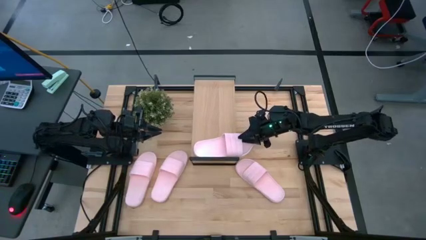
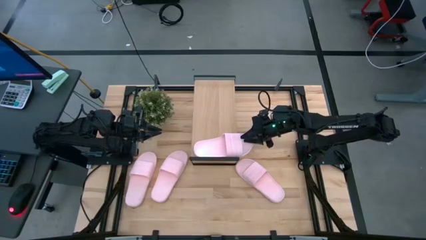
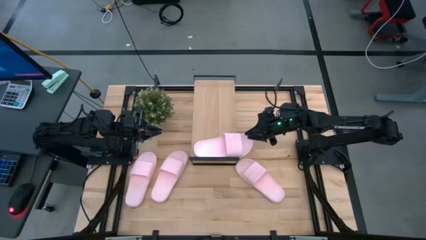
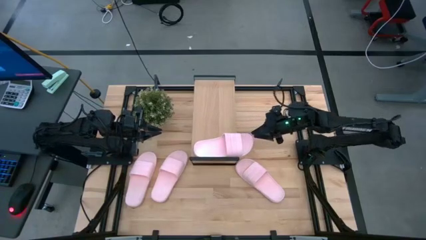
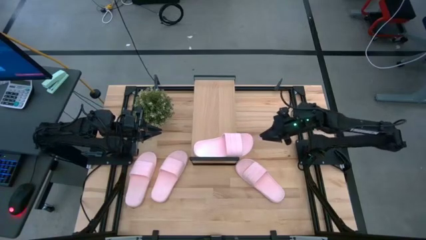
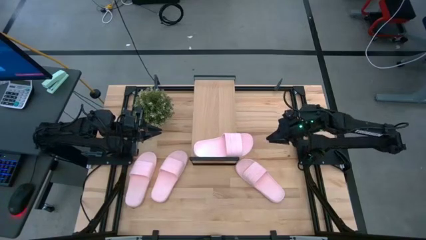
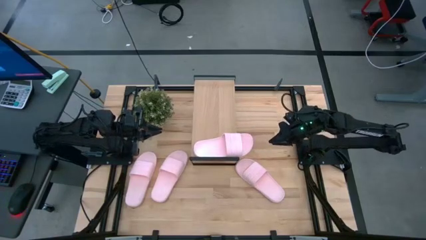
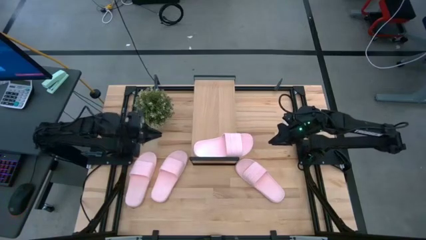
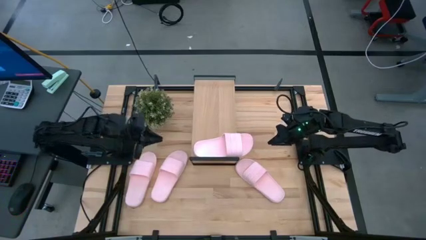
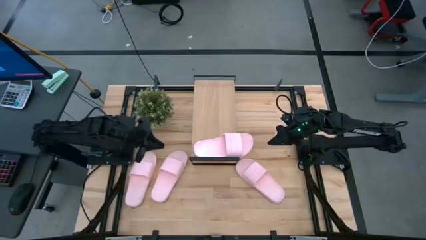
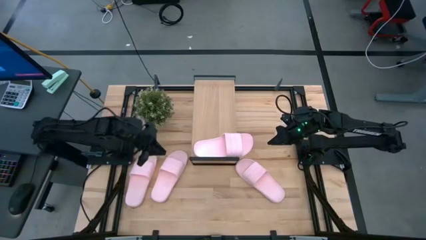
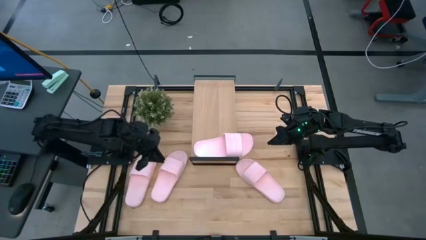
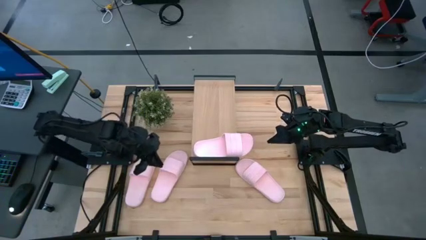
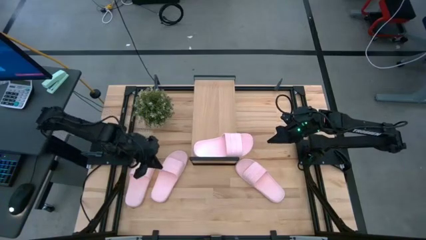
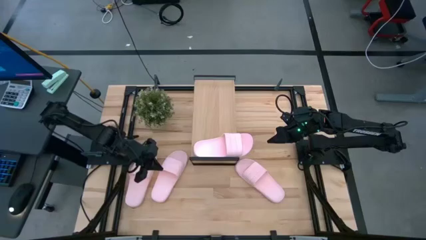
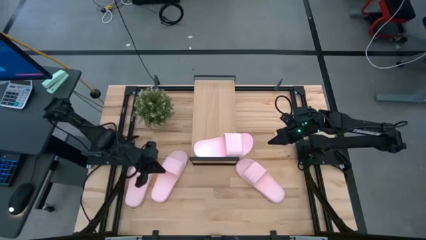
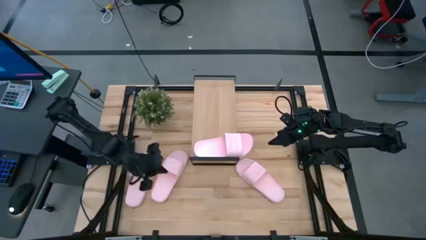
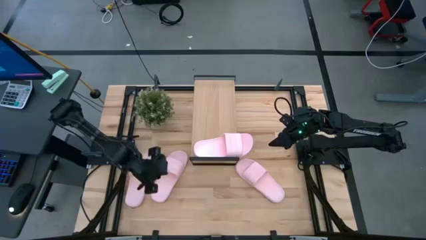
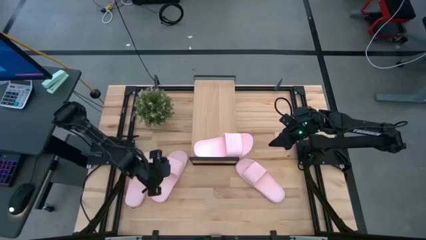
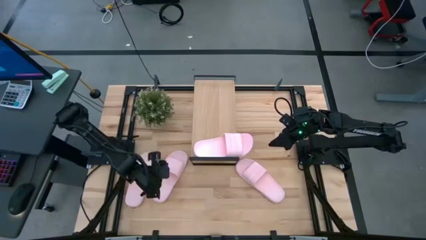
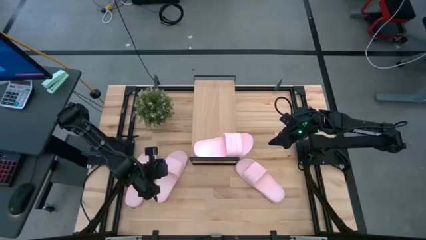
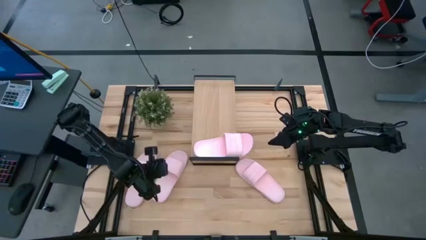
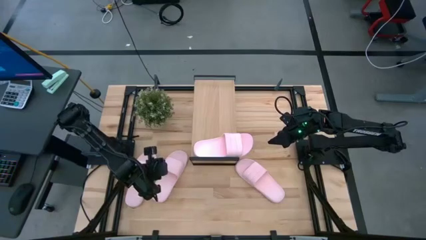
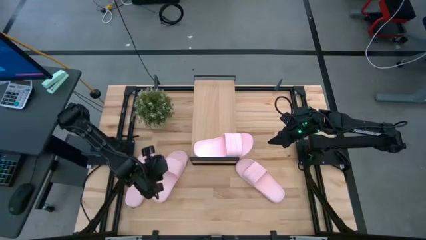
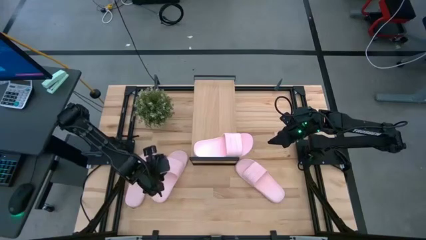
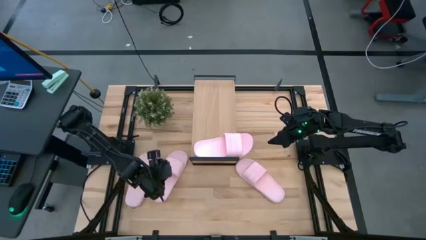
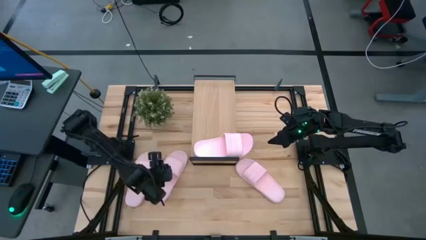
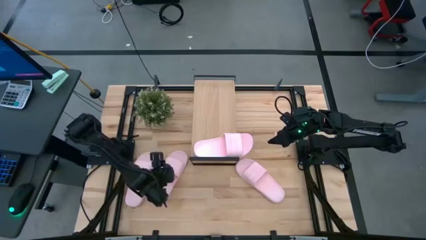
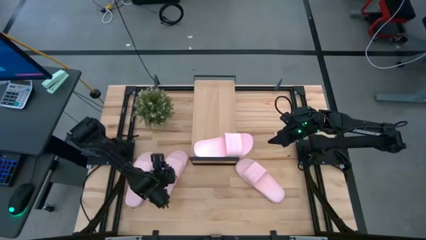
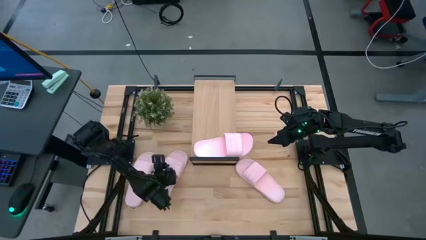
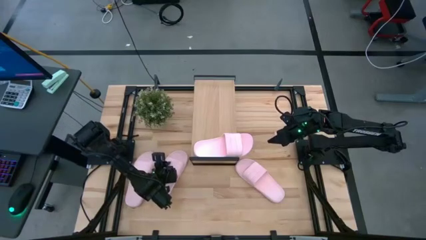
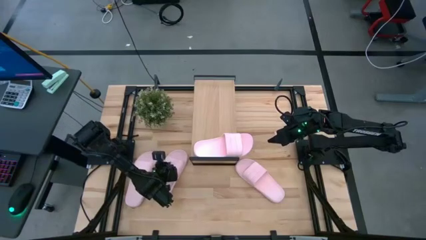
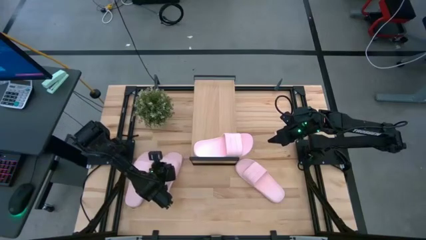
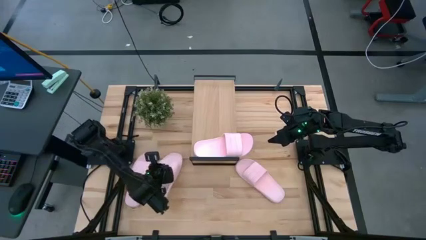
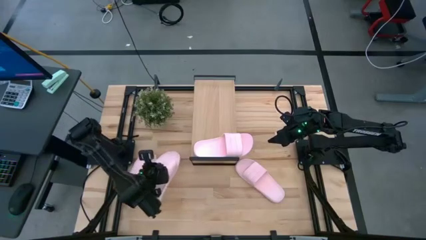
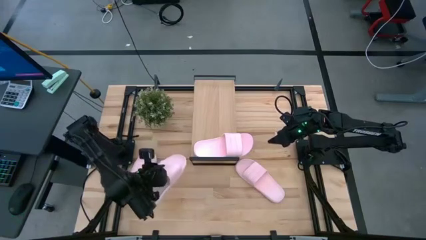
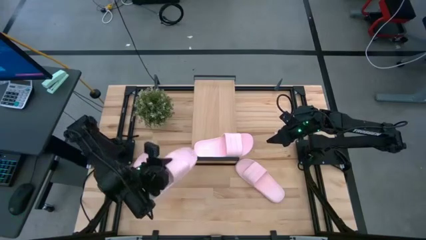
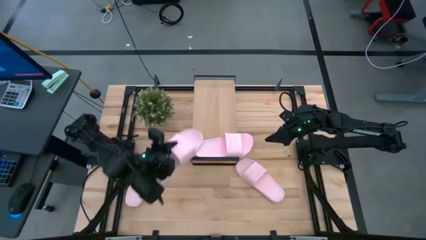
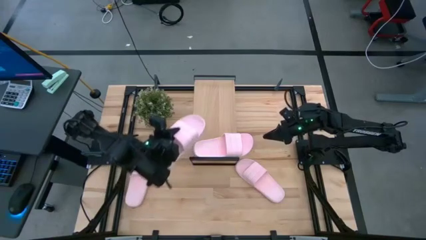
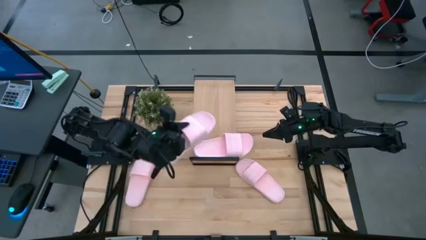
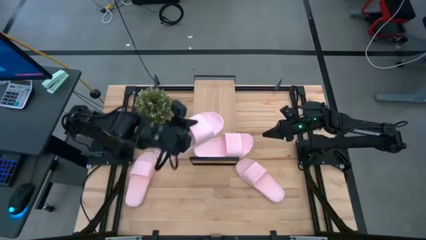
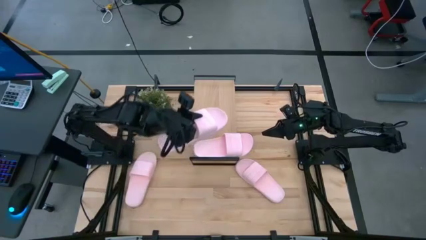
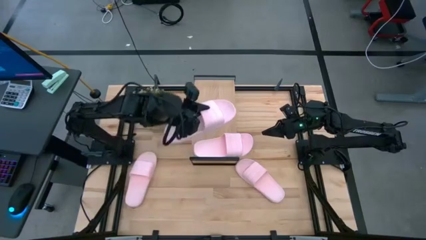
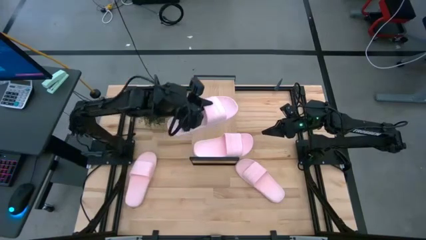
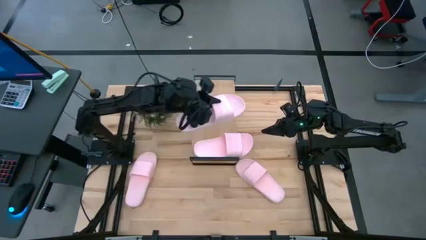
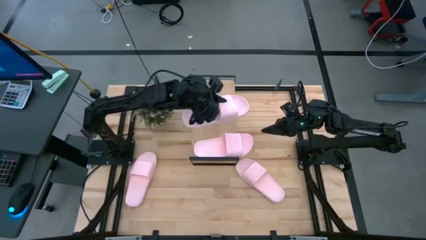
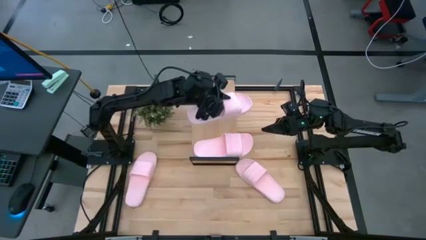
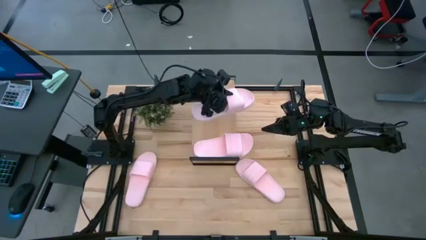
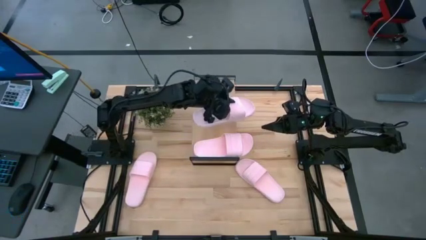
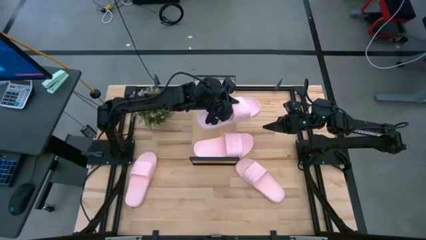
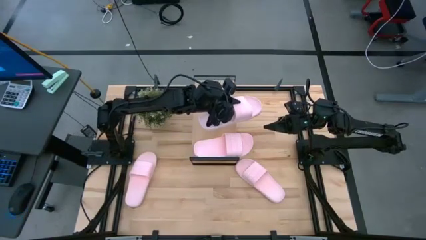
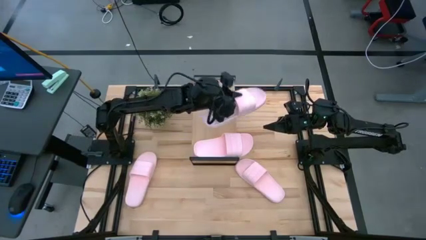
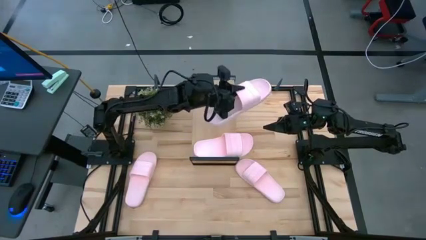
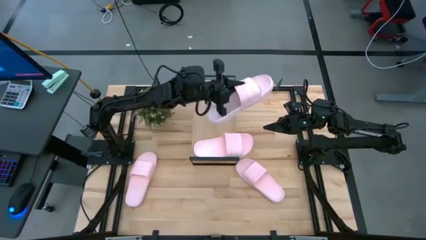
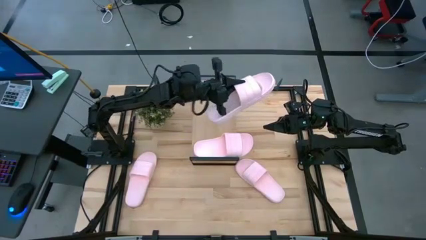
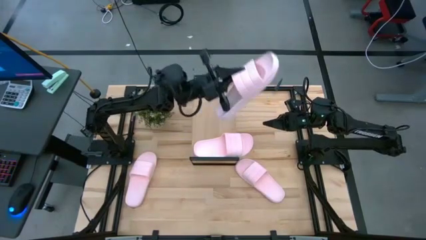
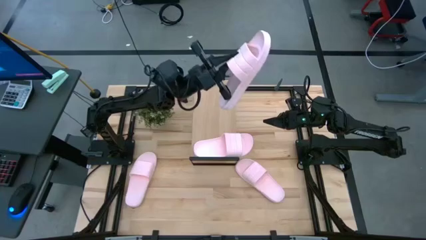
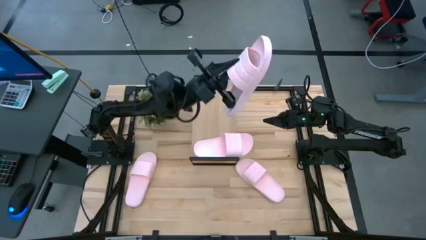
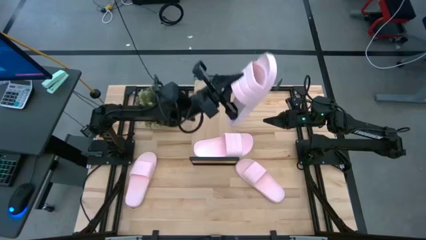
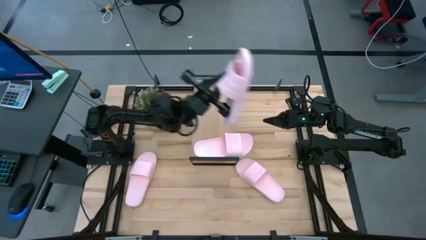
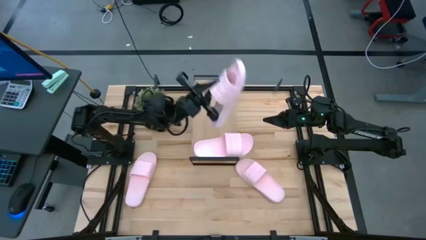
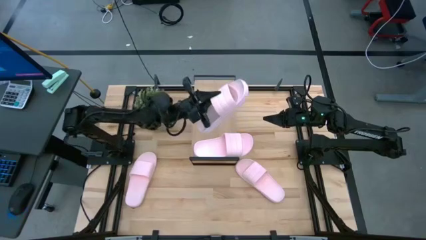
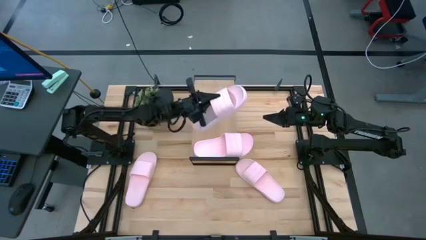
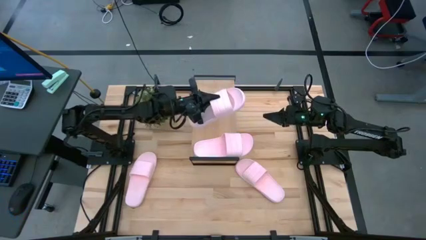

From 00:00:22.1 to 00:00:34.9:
Task: Pick and place slides into the shelf
Put the pink slide on the shelf

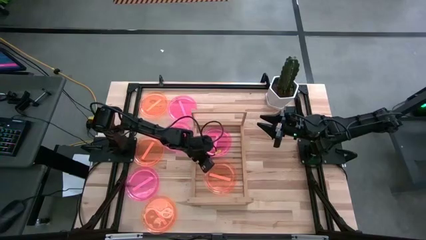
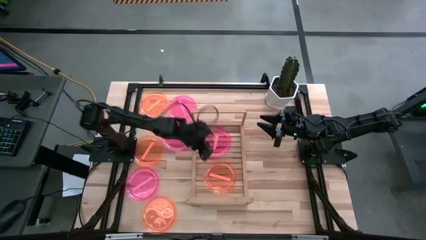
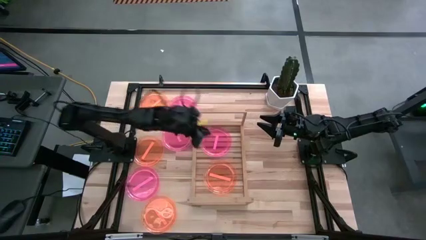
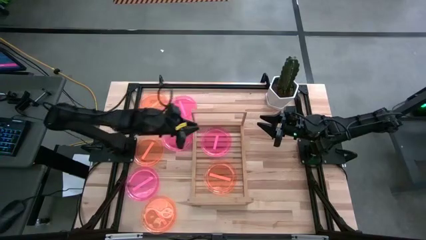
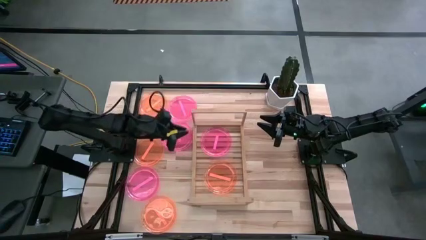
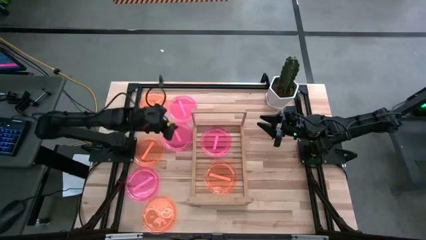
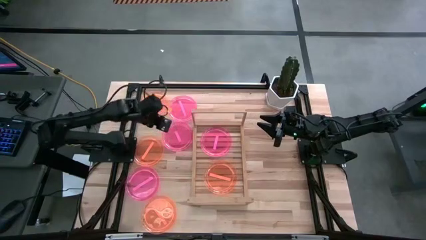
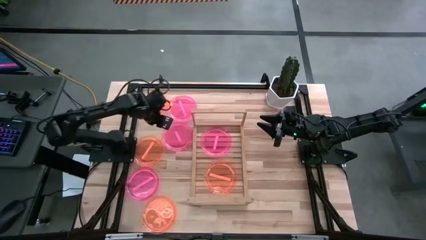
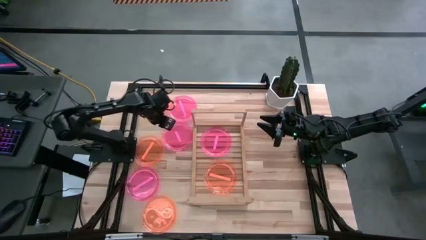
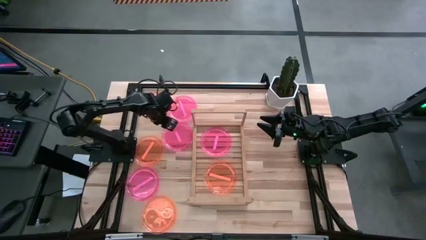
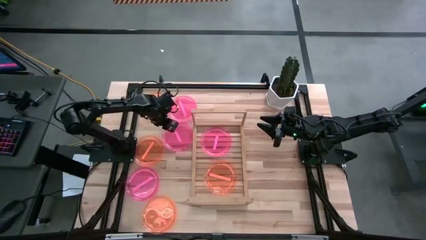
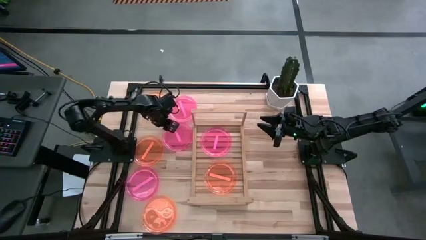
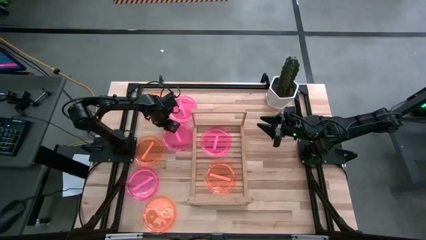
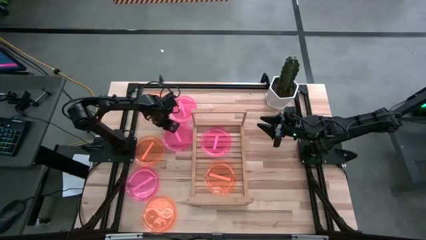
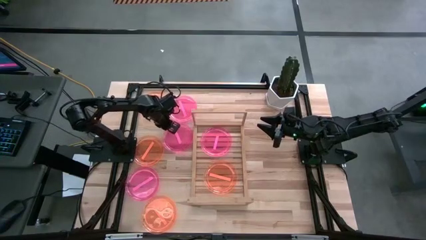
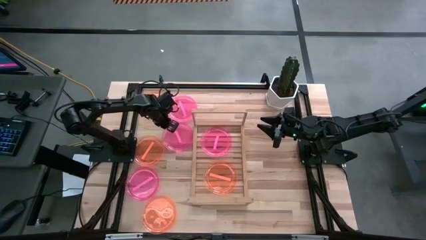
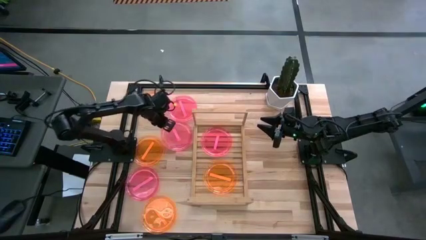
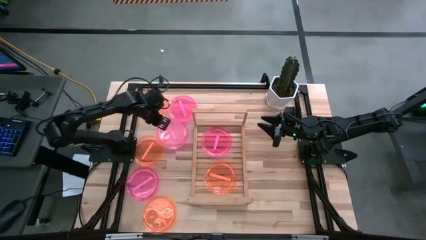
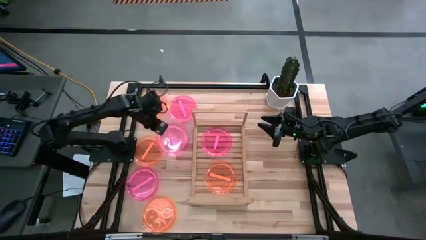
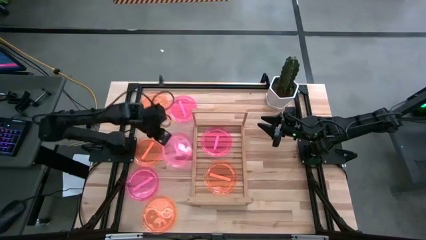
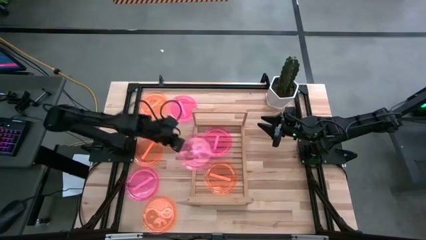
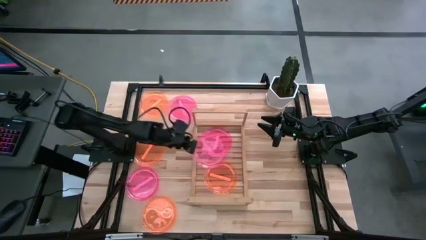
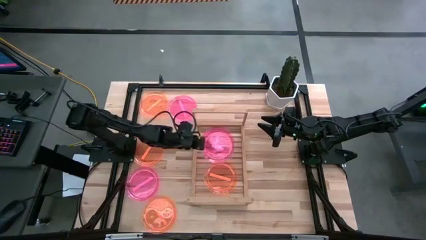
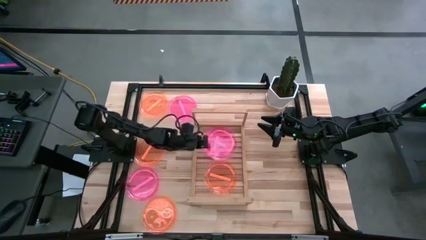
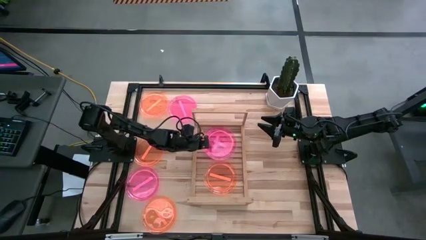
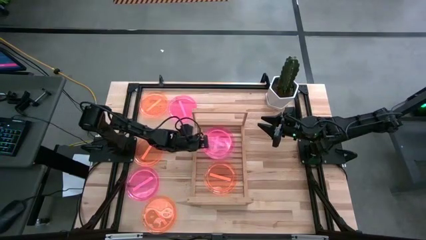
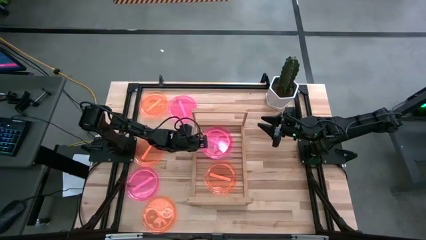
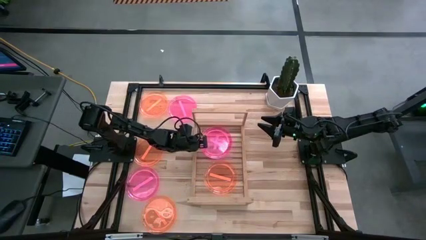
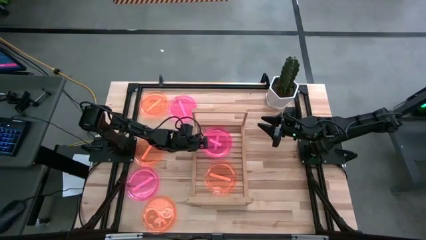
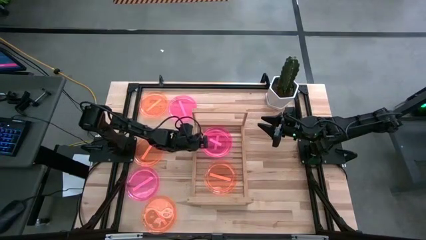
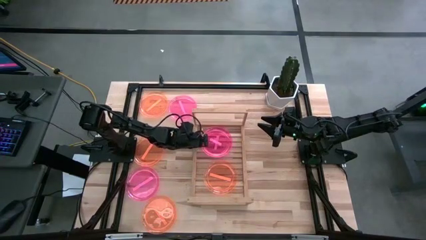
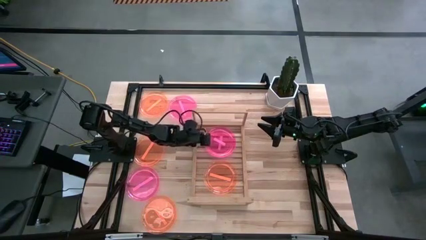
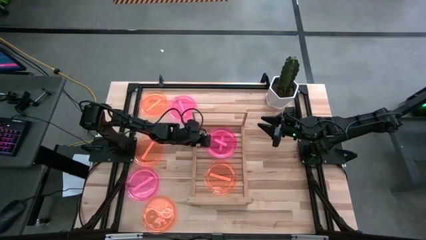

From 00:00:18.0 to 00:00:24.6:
Task: Place and stack plates onto a shelf
Stack the pink plate on top of the pink plate on the shelf
